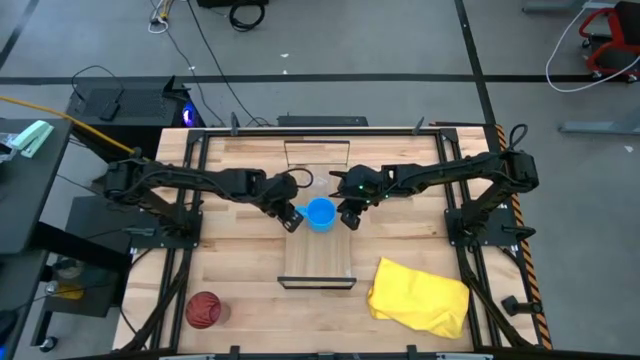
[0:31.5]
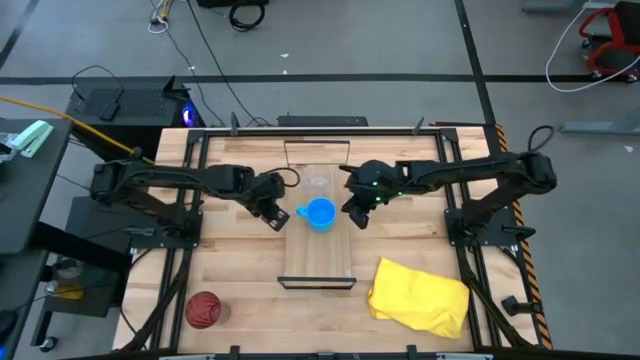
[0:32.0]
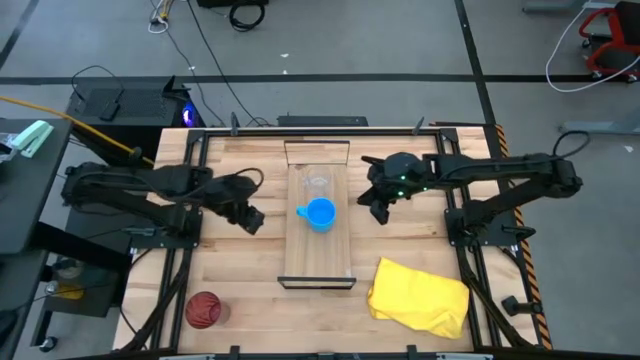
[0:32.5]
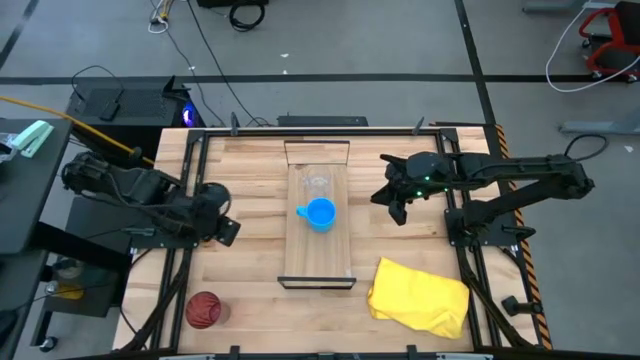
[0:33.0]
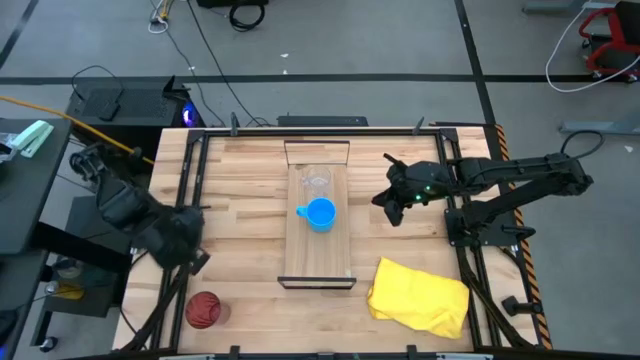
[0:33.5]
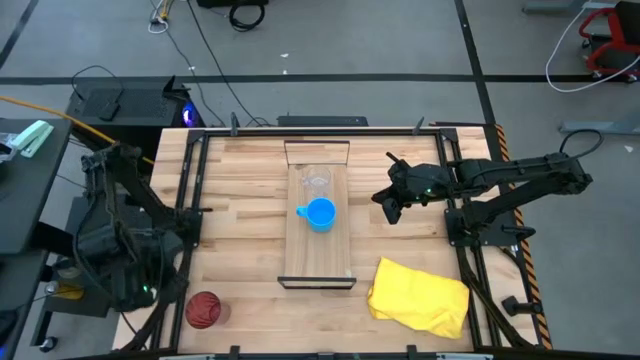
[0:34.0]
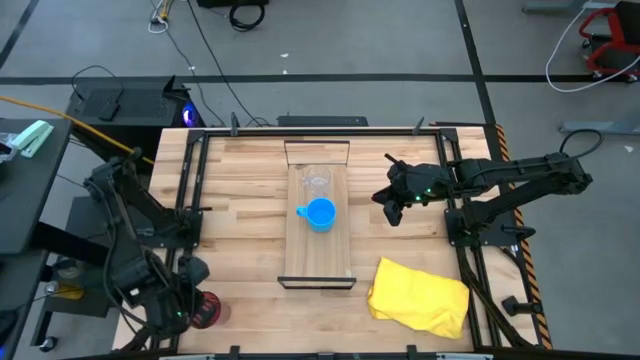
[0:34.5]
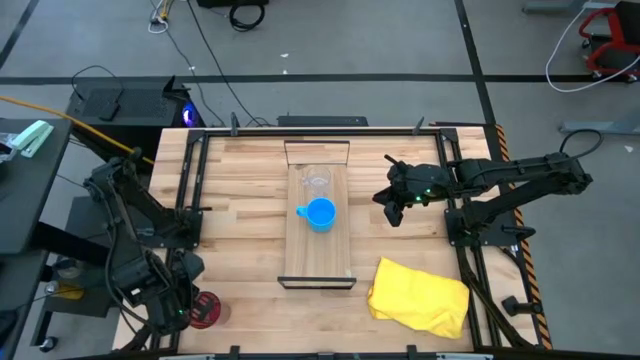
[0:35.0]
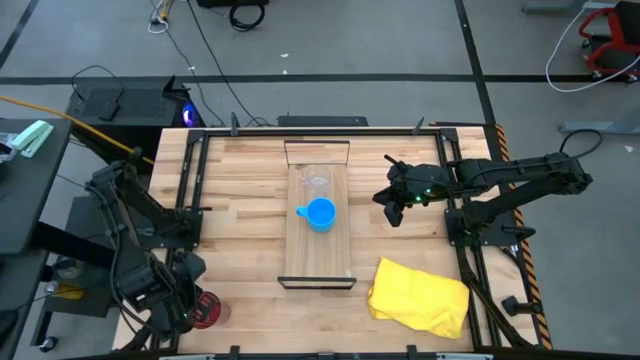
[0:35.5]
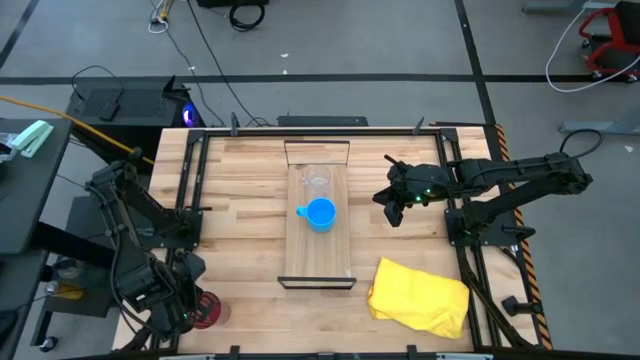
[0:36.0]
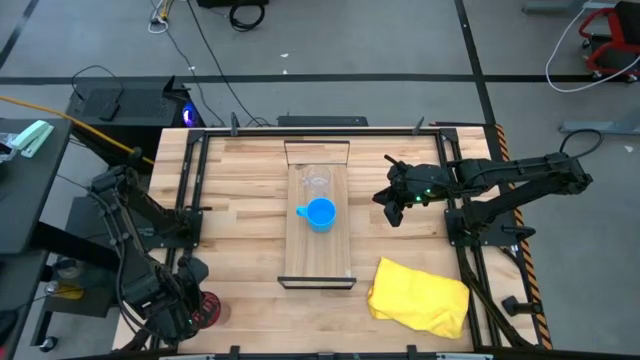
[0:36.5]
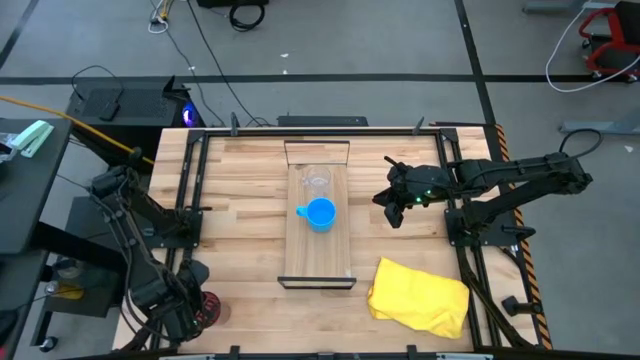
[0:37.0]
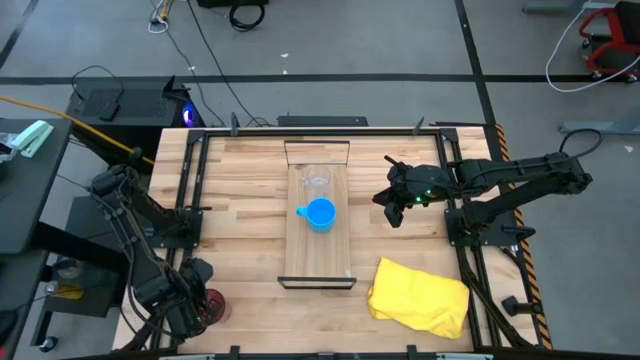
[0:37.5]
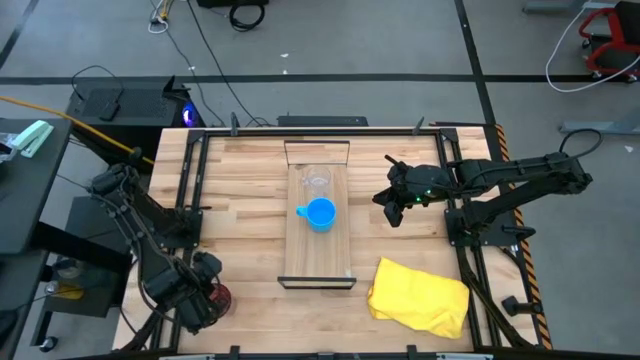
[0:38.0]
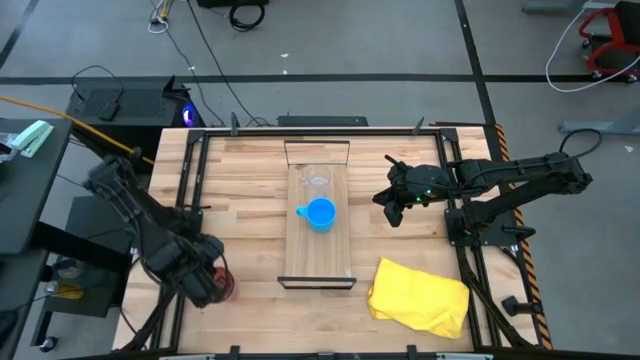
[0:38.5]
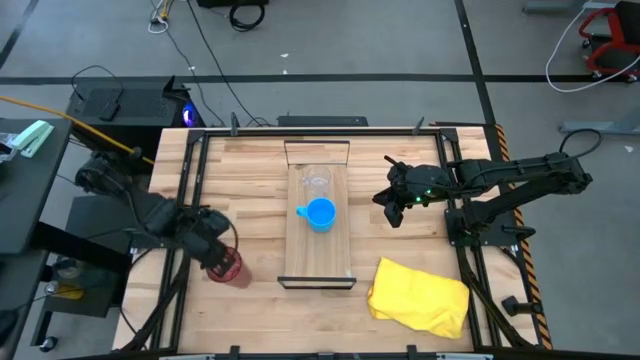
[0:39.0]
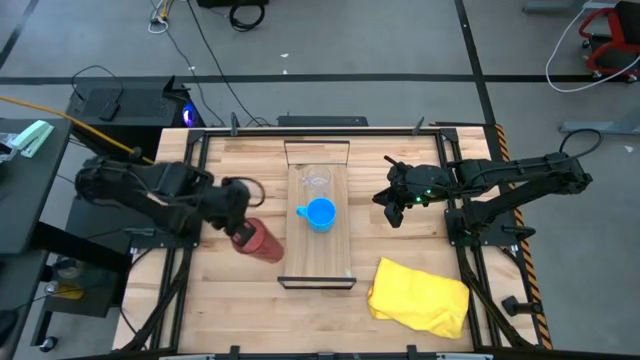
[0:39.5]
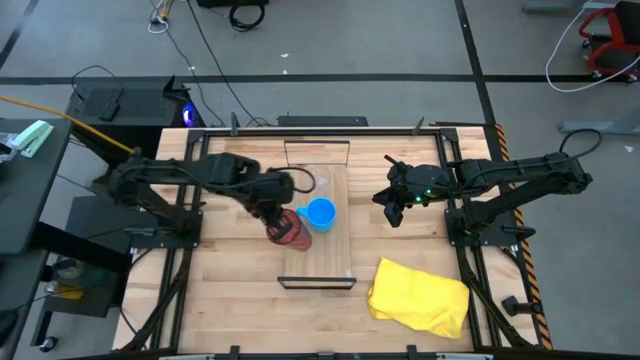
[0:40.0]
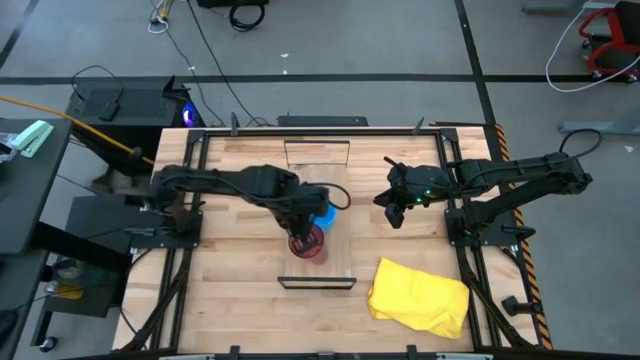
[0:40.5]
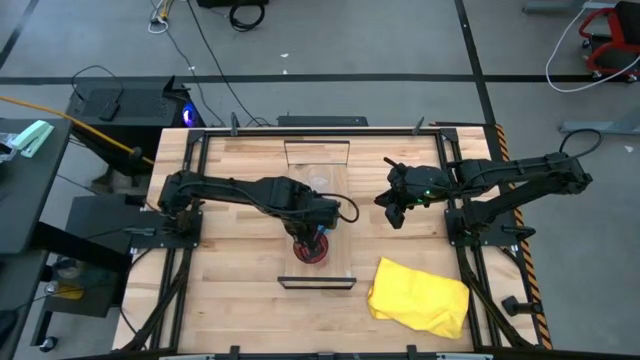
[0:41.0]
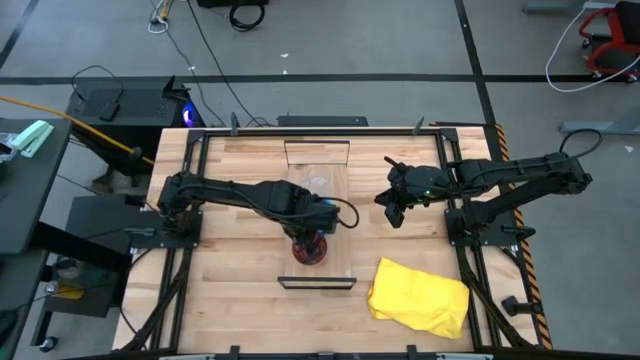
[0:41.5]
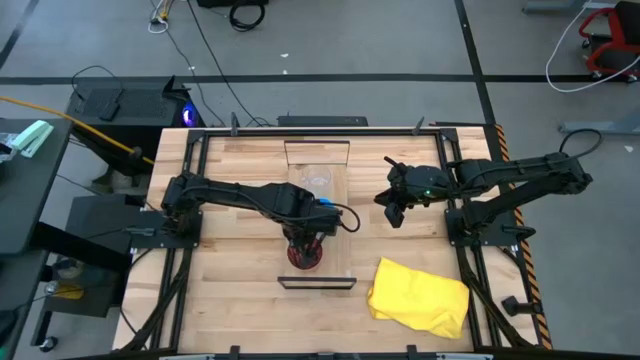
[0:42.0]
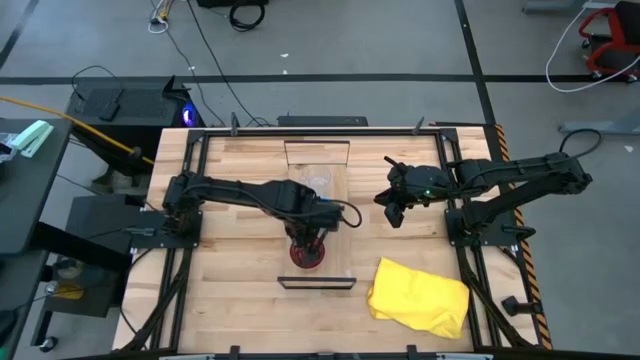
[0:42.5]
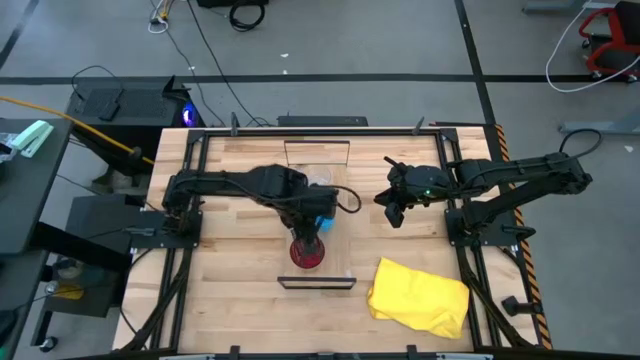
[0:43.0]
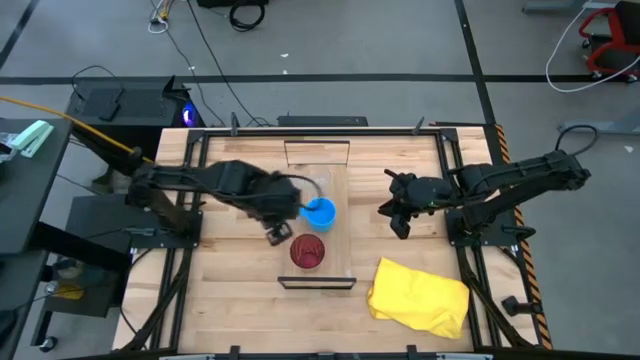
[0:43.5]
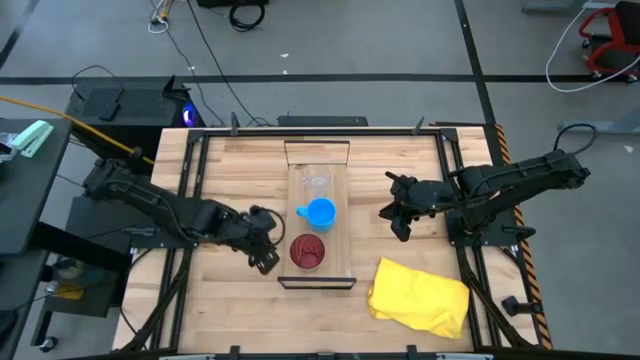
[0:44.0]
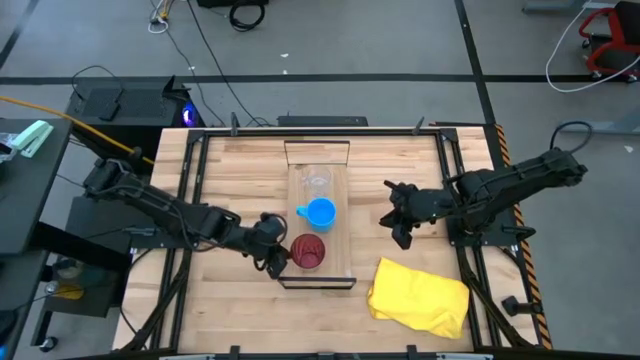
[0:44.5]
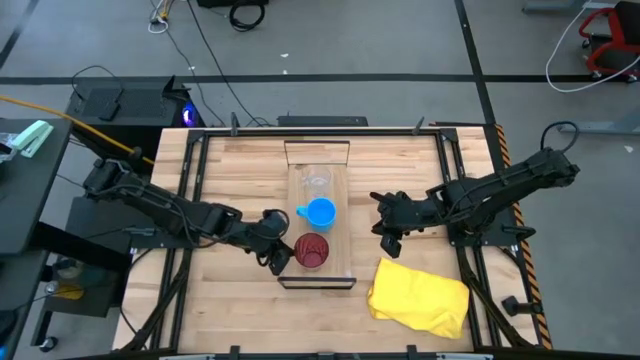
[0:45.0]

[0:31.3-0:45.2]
Task: Stack small to large cups/mugs on shelf
Put the red cup on the shelf

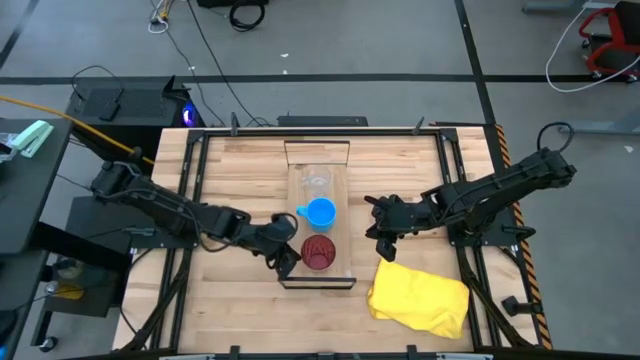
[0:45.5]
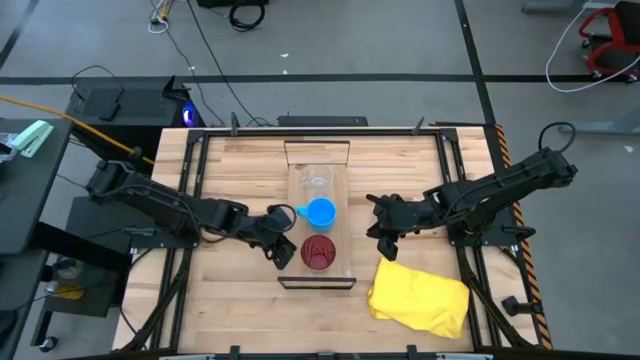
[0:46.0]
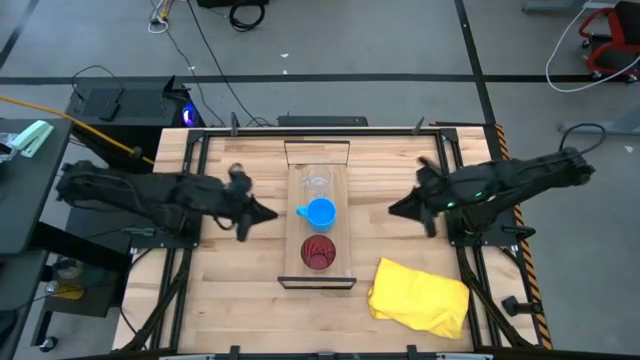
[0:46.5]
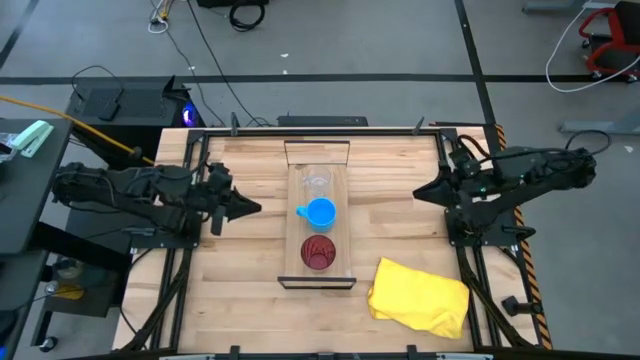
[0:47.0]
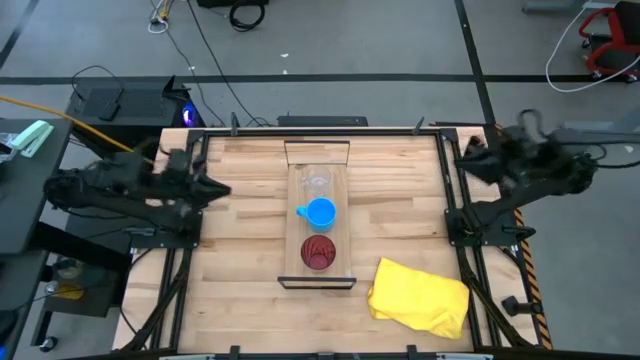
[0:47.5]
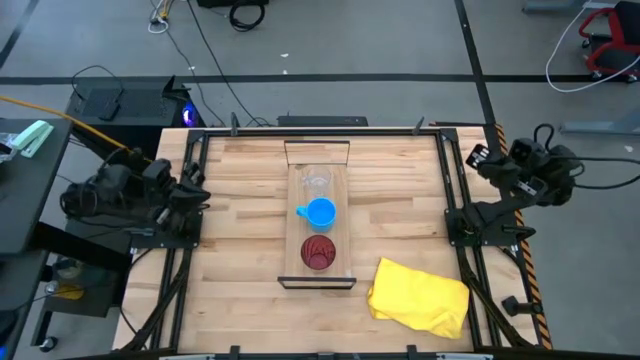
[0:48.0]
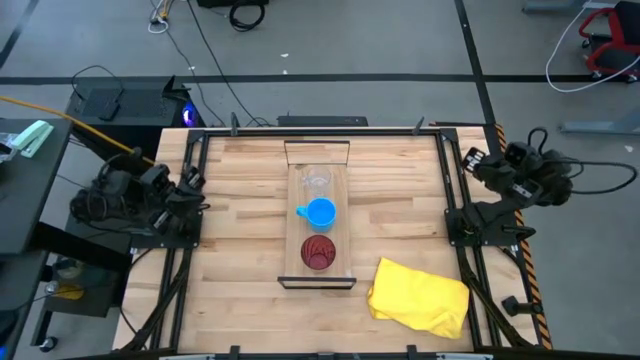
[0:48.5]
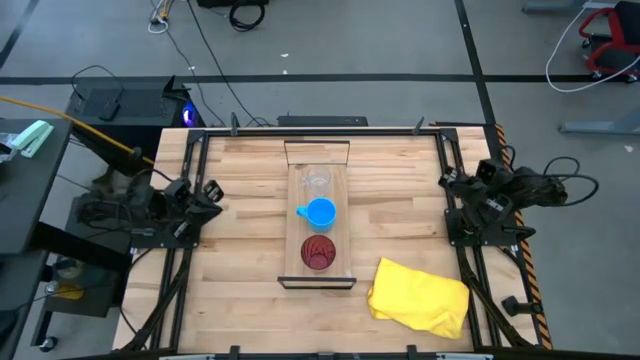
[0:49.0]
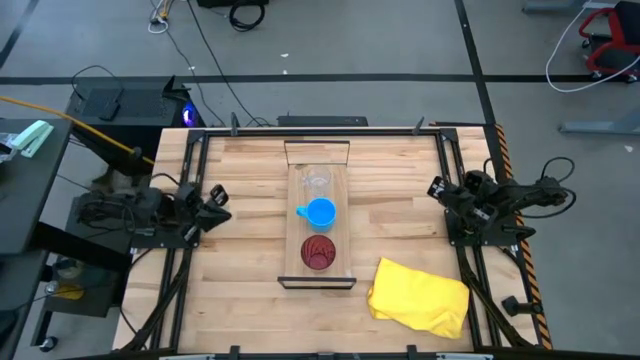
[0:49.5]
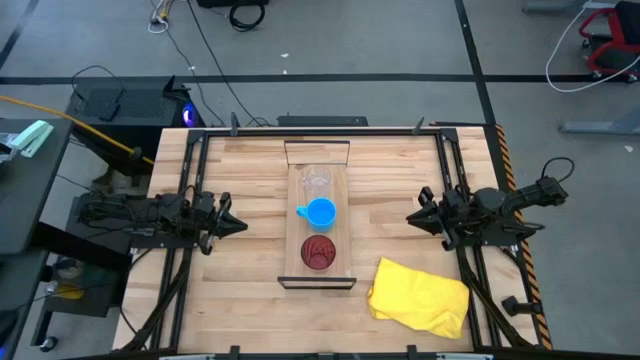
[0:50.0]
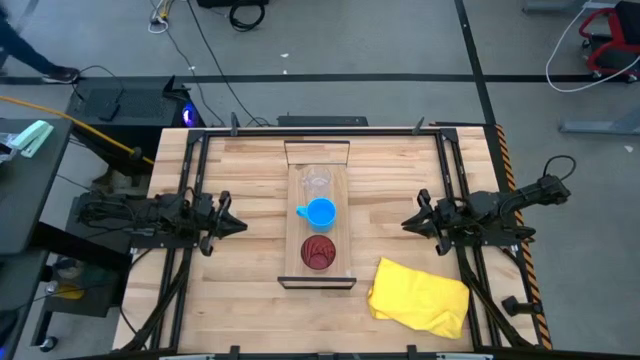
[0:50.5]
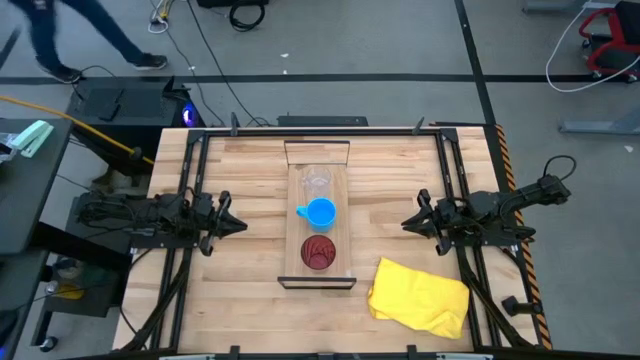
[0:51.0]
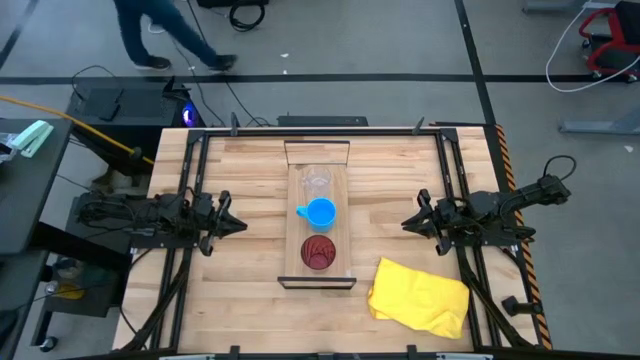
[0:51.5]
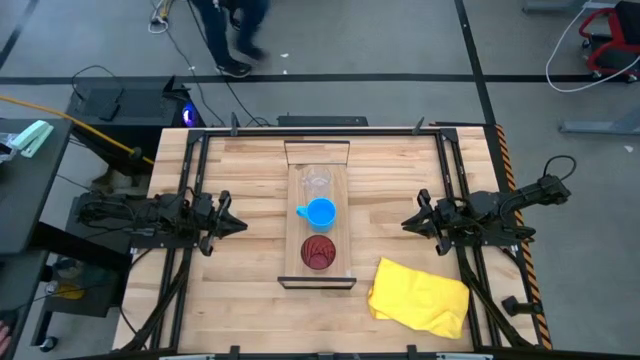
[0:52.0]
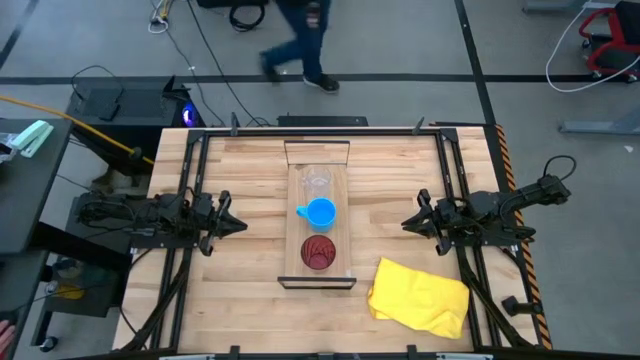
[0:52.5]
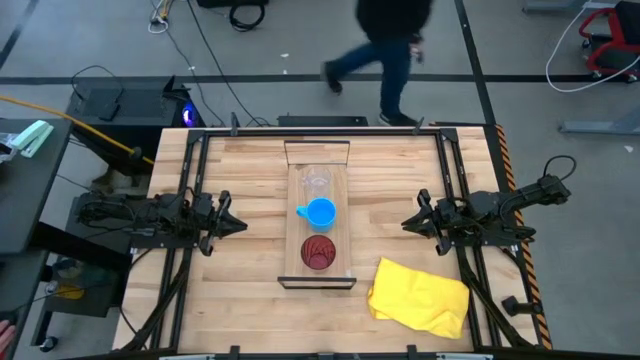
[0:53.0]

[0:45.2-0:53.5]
Return to Home Position
